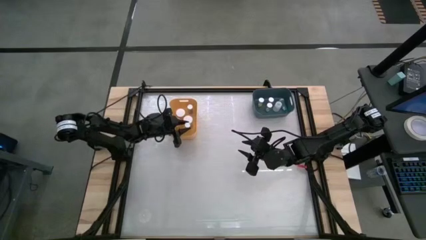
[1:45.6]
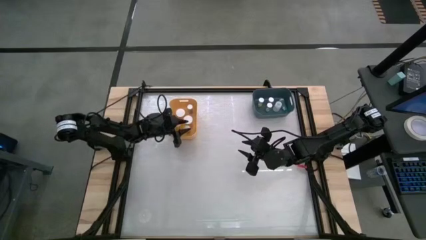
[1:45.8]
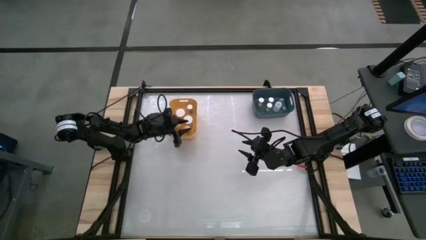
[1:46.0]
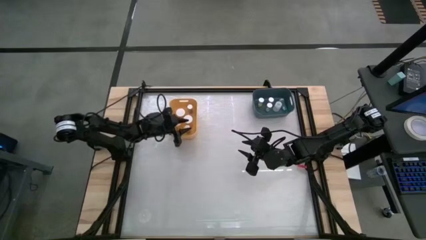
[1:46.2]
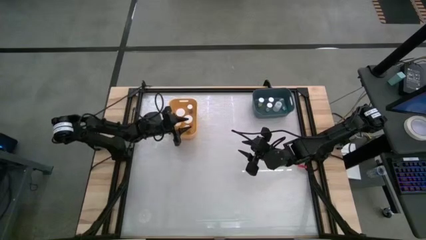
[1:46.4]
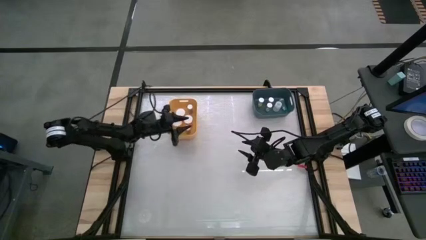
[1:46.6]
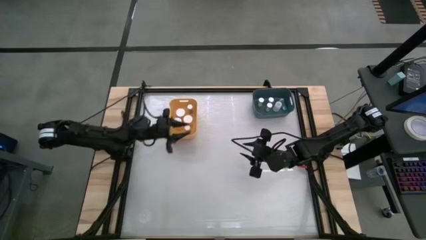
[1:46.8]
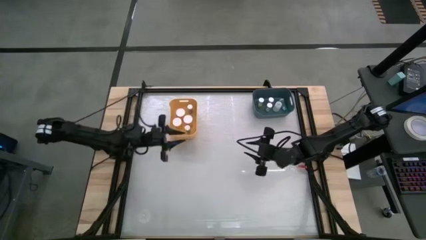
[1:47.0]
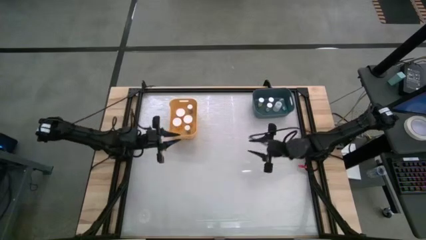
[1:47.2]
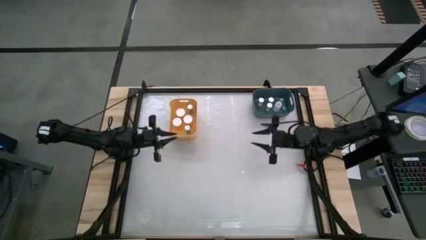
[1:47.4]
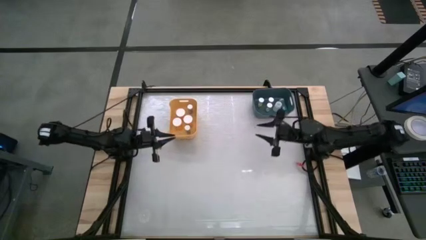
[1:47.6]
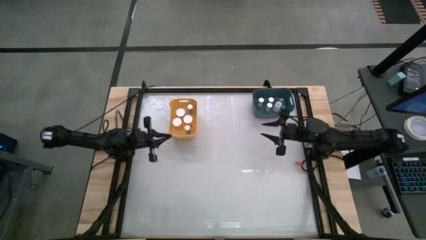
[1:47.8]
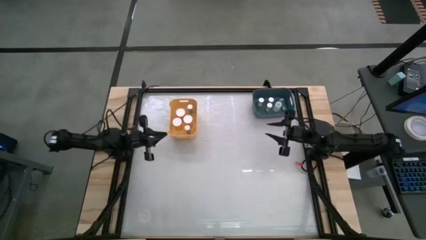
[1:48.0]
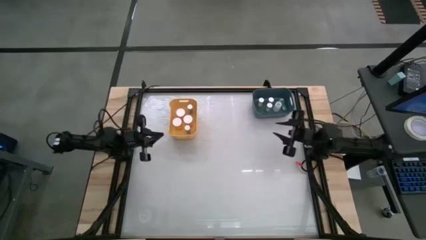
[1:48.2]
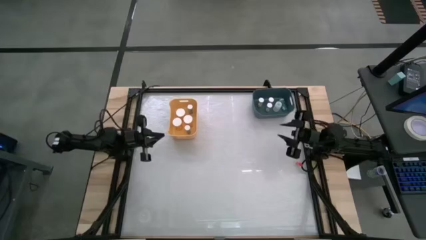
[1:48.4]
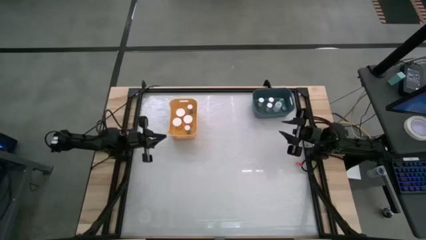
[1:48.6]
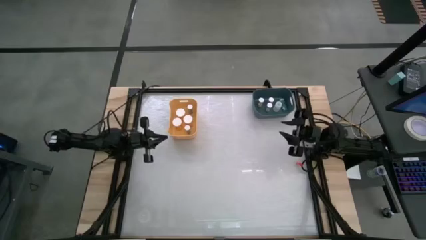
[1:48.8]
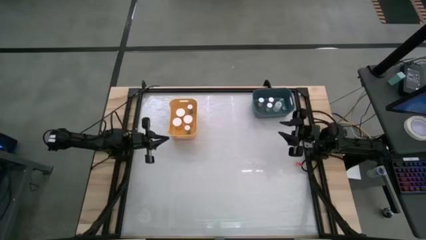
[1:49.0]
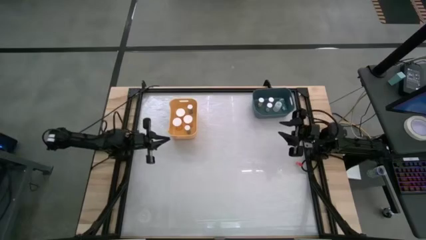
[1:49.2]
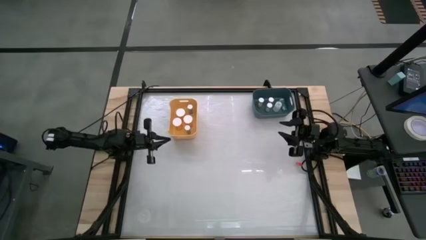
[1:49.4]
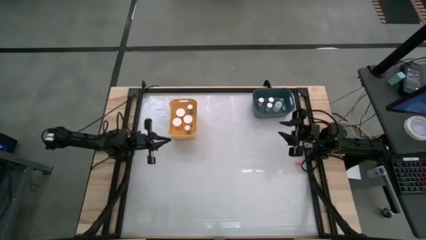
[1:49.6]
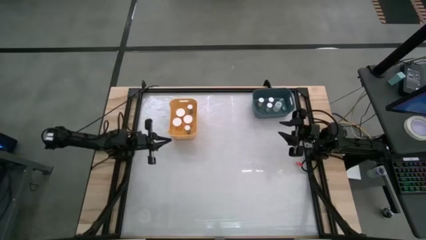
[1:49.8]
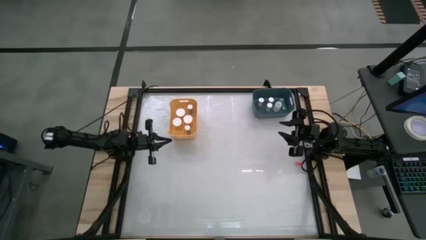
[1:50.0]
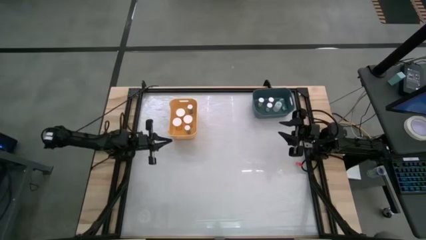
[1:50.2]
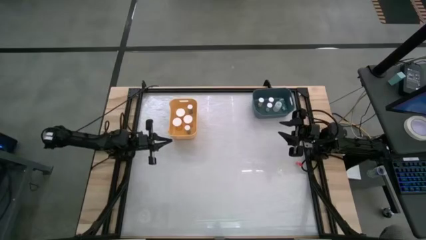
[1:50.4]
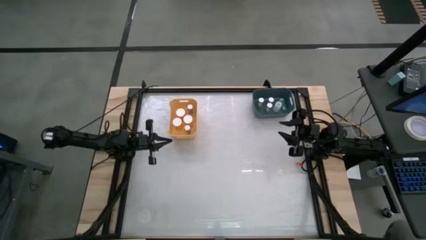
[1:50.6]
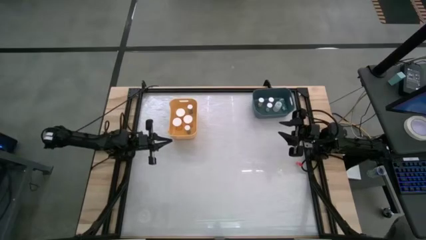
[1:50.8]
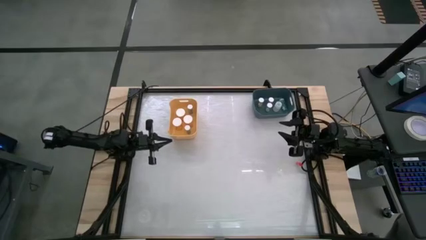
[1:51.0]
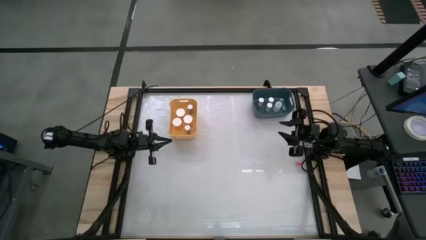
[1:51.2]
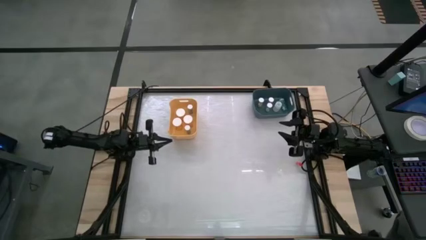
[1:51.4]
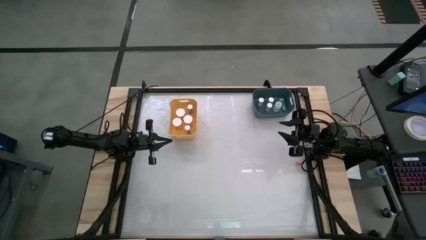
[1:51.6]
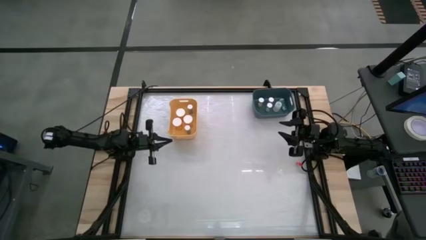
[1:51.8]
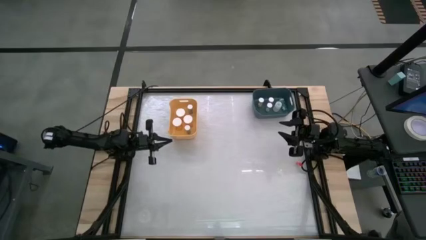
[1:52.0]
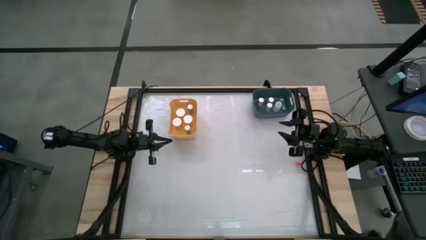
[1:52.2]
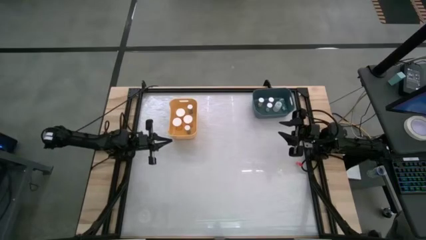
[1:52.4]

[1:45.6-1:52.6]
Task: Pick and place medicine bottles into bin by pill shape (circle, oval)
Return to Home Position

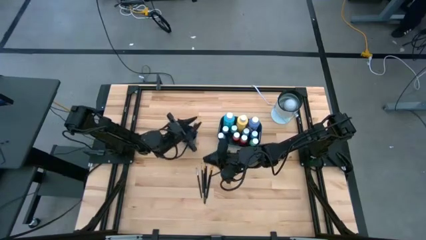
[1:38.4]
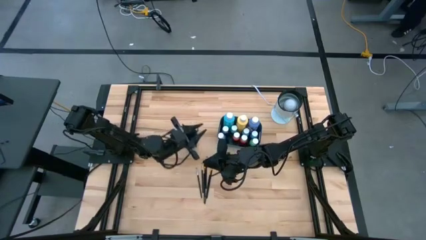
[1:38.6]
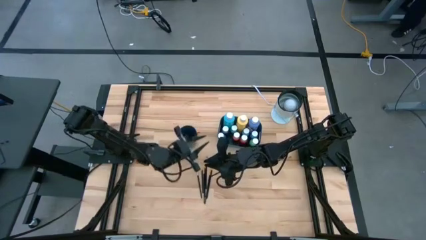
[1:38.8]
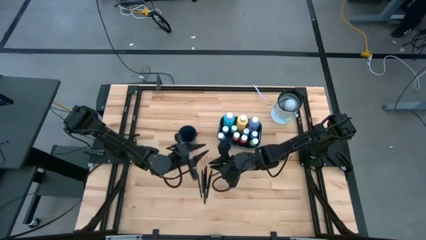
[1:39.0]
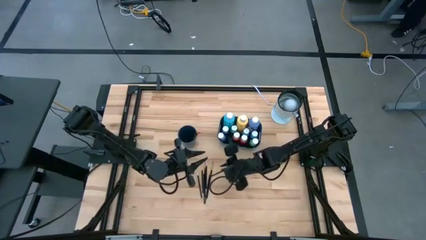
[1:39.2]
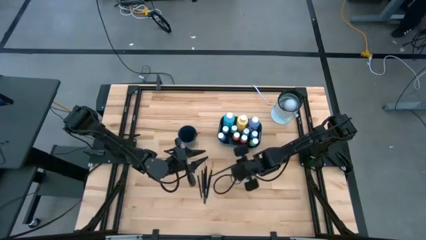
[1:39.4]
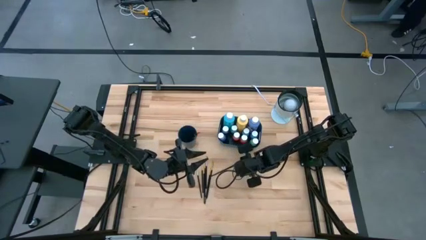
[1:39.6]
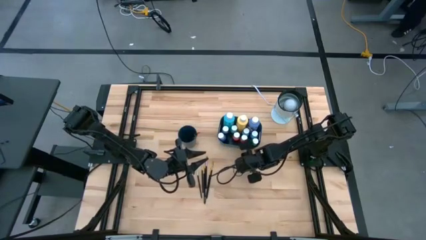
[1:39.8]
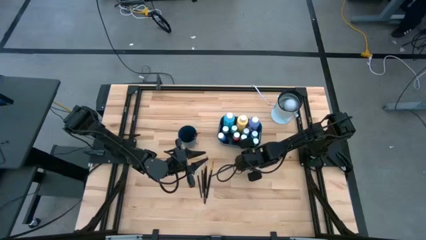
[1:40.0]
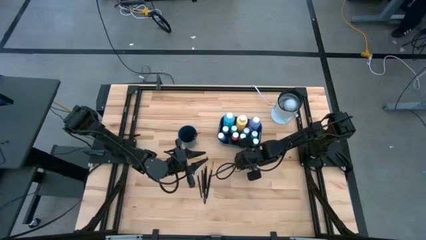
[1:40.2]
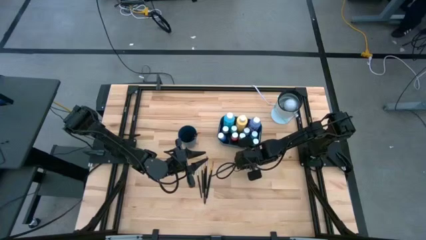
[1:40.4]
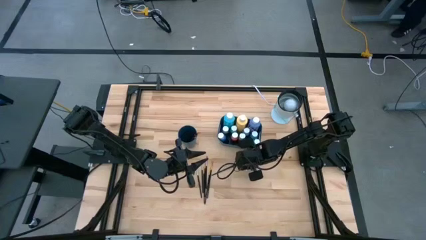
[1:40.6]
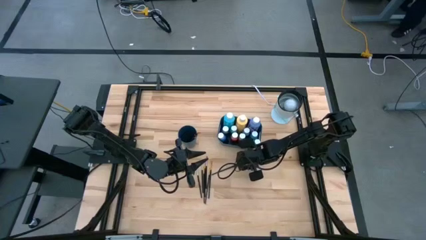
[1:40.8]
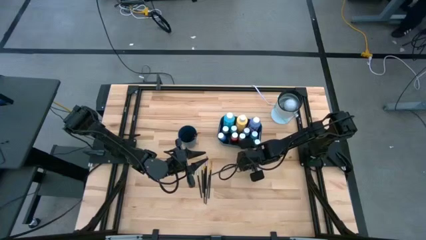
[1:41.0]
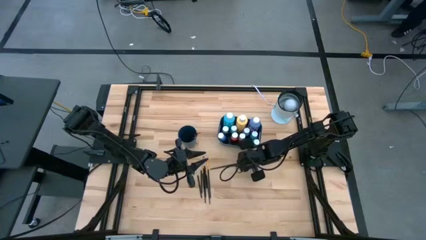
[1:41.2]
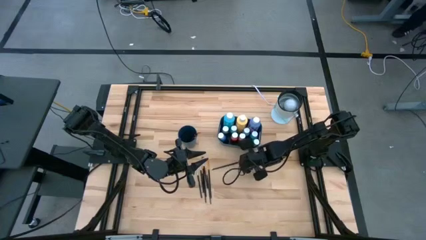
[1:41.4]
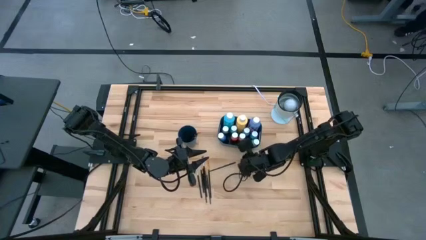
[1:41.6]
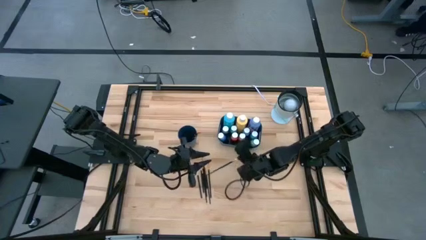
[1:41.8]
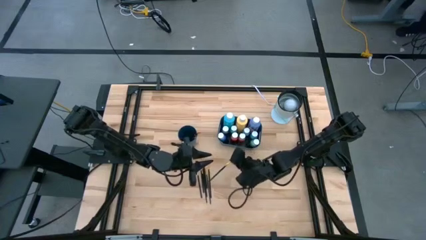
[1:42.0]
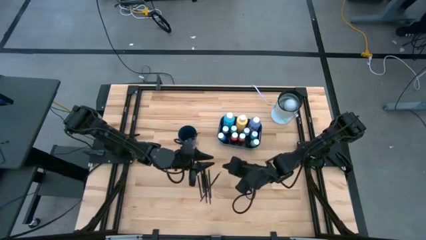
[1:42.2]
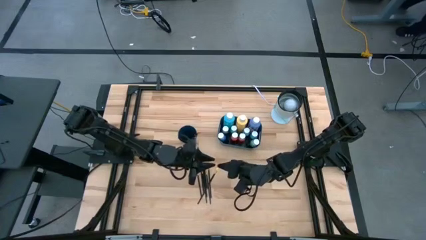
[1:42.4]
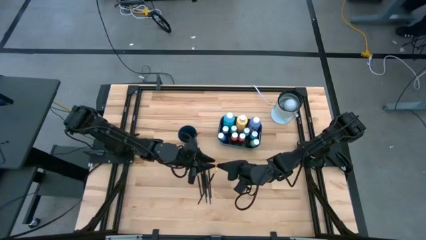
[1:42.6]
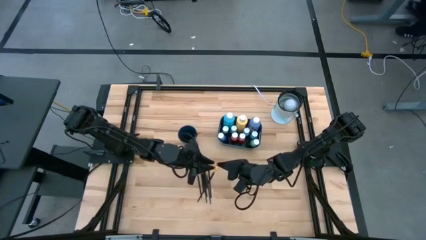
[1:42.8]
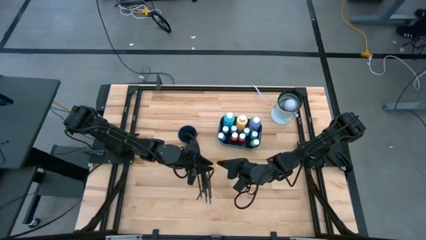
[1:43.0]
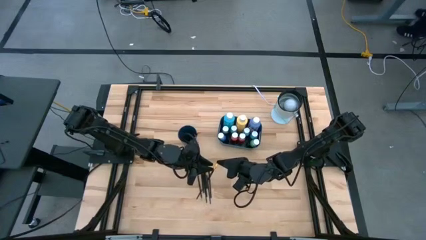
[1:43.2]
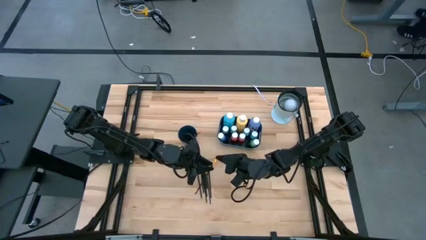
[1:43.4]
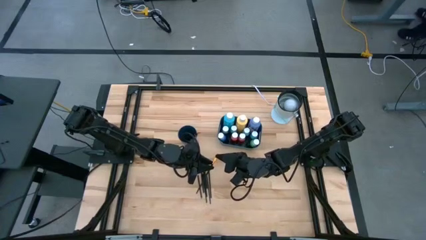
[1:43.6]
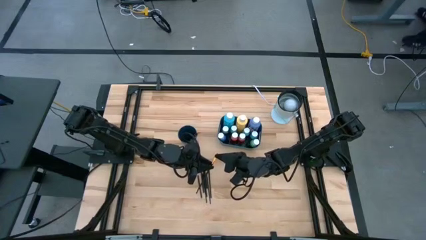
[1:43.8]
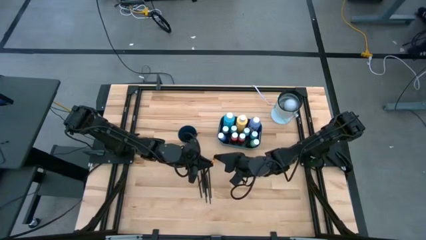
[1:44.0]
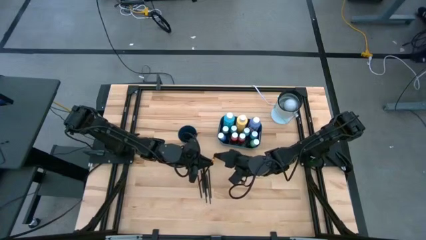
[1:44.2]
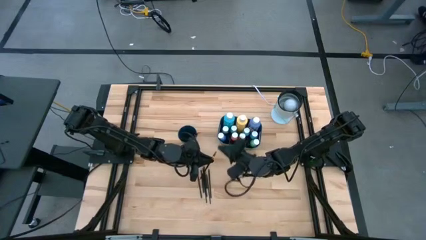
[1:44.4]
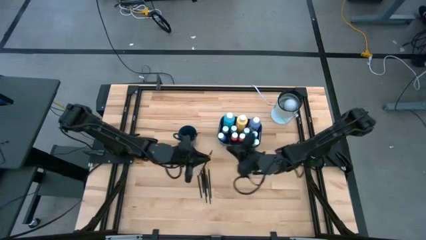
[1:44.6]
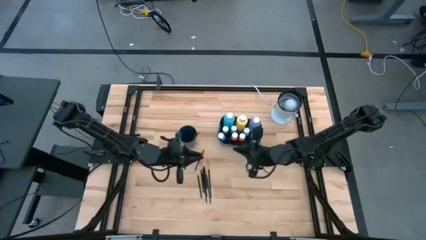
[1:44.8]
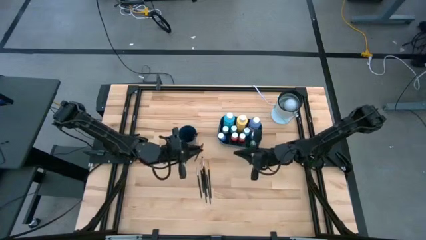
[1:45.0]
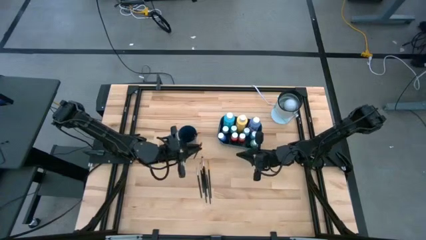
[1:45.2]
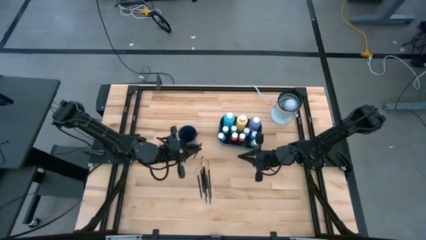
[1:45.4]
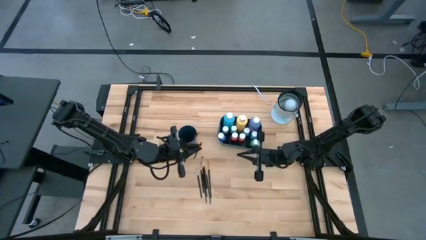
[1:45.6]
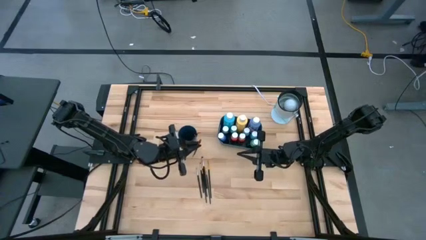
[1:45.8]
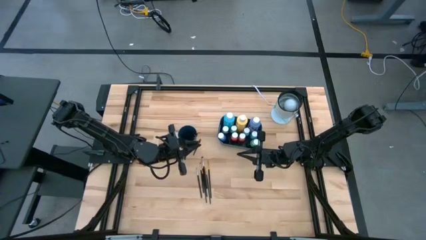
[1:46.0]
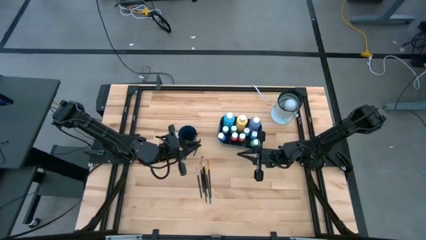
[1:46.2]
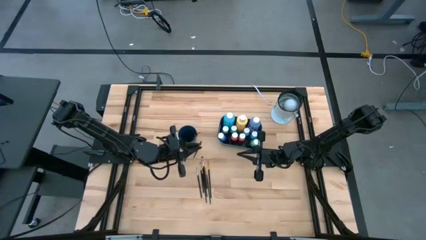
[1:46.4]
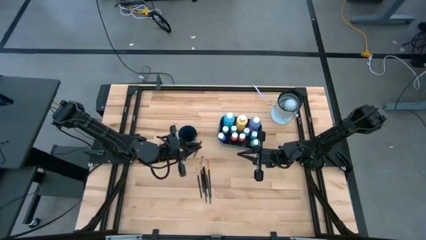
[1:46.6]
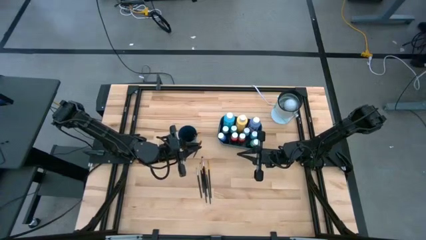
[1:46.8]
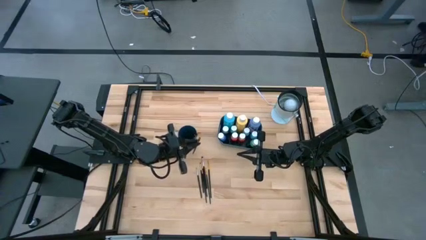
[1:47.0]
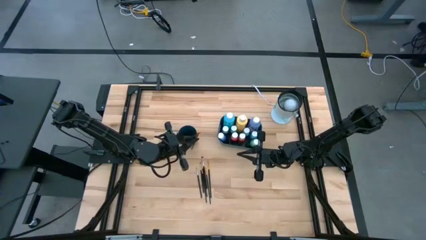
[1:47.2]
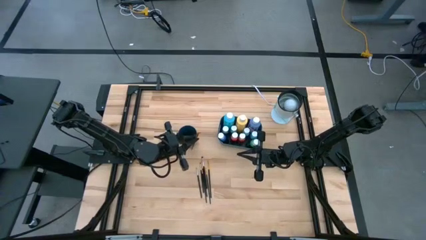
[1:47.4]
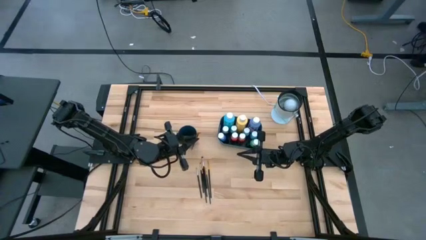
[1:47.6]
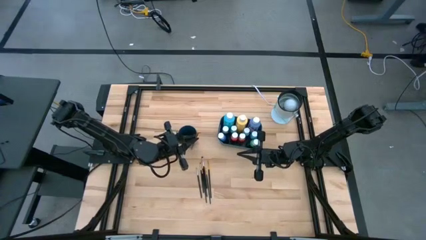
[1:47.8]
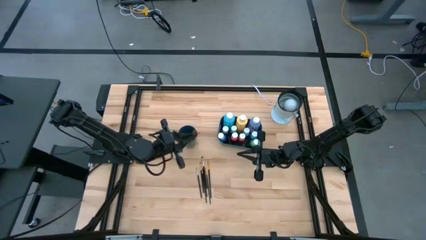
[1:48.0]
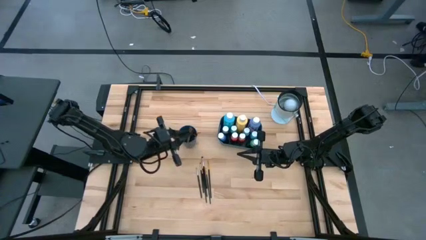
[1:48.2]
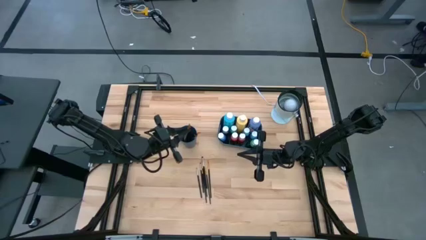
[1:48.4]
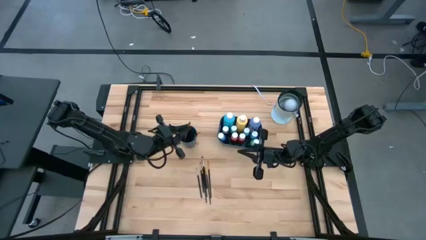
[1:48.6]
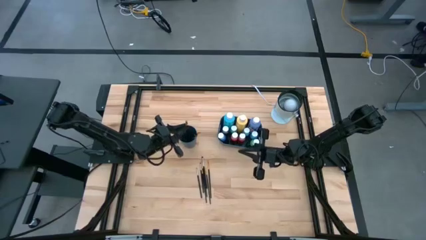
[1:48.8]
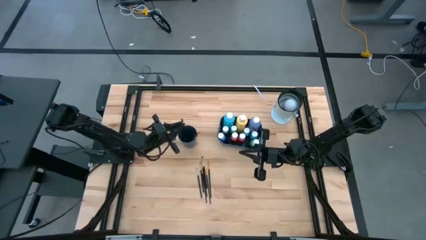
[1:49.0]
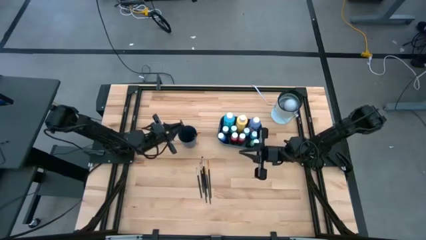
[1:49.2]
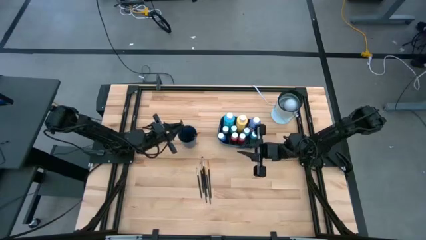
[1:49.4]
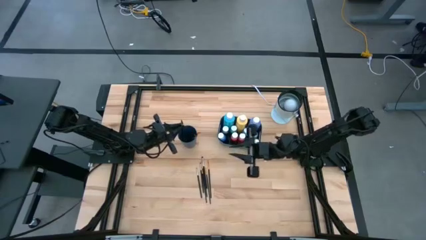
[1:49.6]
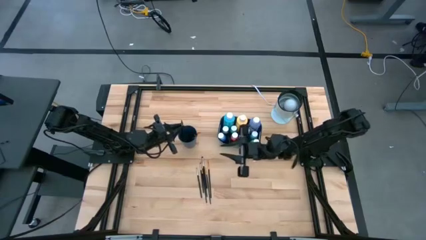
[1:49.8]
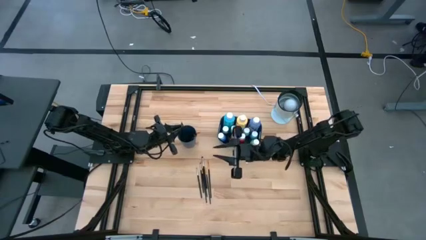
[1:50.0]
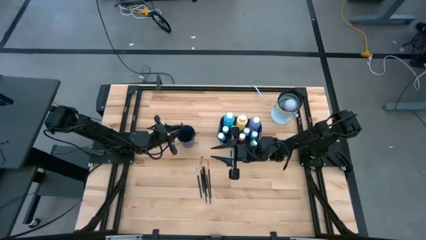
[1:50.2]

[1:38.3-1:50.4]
Task: Pick & Place Paint Supplies
Put the gold paintbrush into the blue cup
